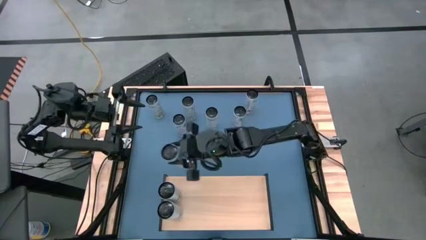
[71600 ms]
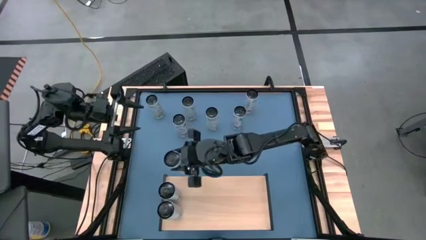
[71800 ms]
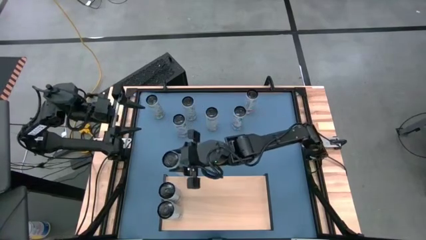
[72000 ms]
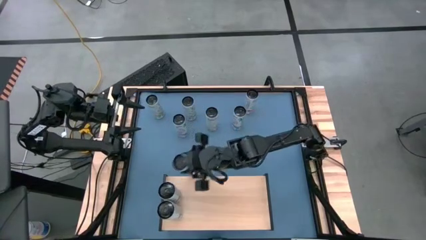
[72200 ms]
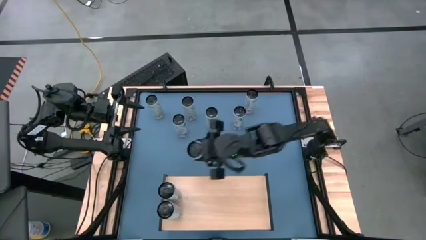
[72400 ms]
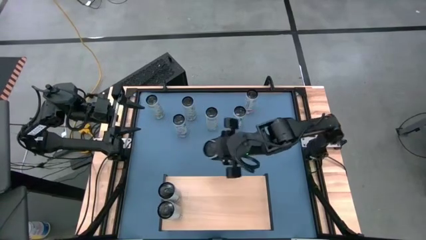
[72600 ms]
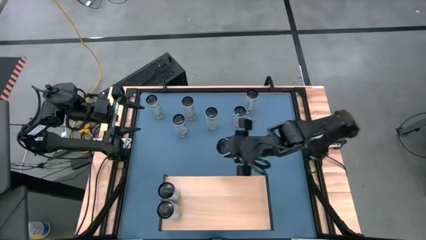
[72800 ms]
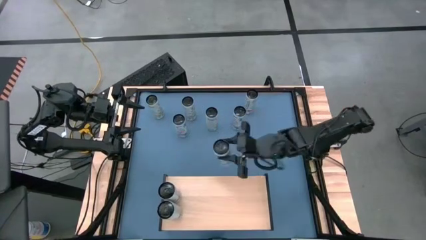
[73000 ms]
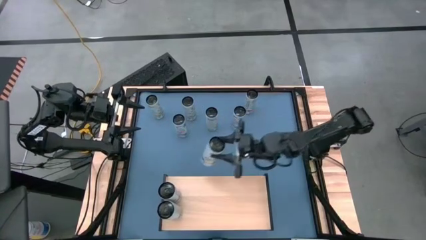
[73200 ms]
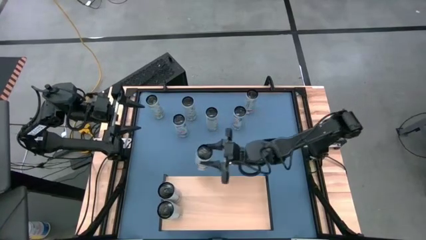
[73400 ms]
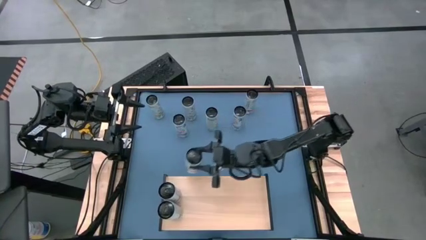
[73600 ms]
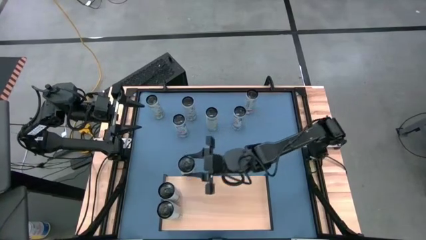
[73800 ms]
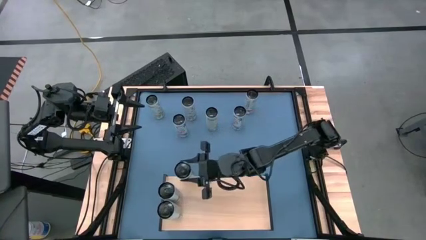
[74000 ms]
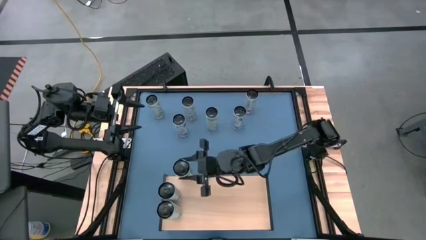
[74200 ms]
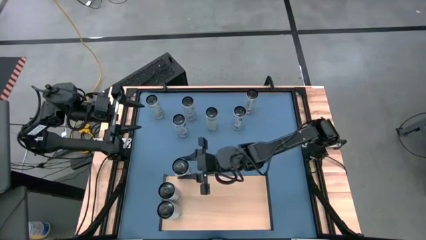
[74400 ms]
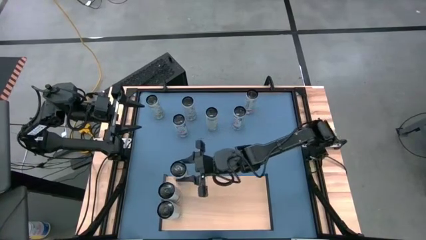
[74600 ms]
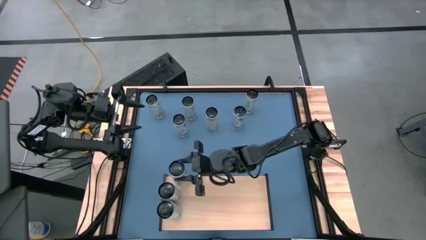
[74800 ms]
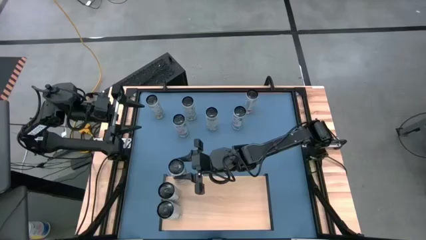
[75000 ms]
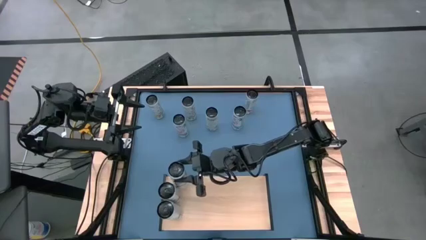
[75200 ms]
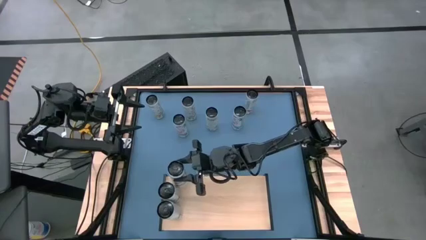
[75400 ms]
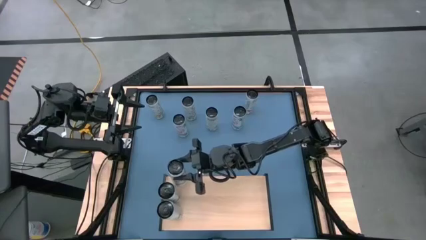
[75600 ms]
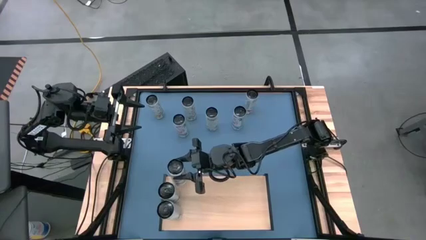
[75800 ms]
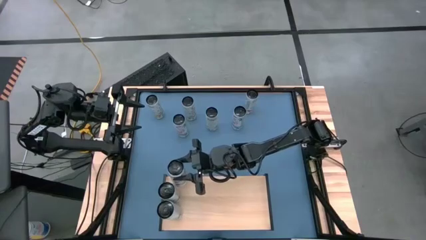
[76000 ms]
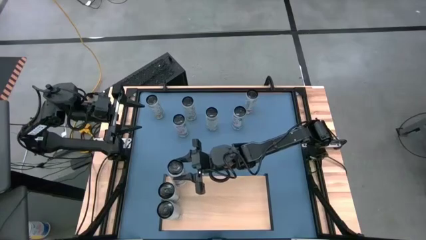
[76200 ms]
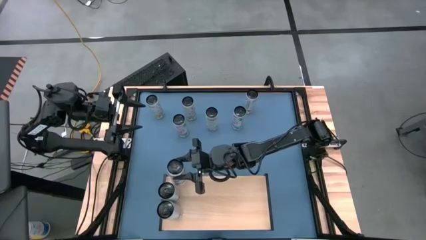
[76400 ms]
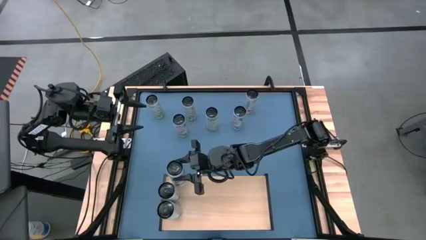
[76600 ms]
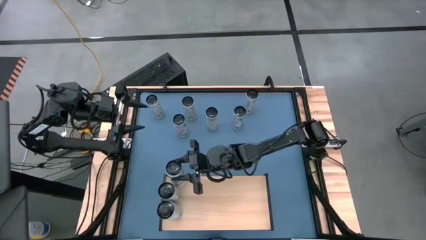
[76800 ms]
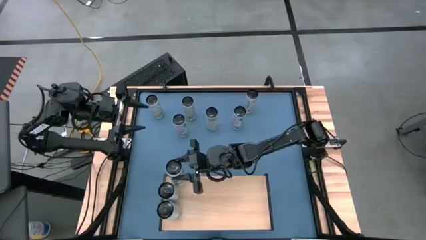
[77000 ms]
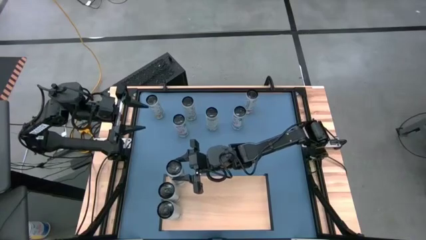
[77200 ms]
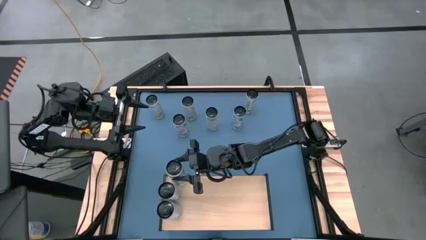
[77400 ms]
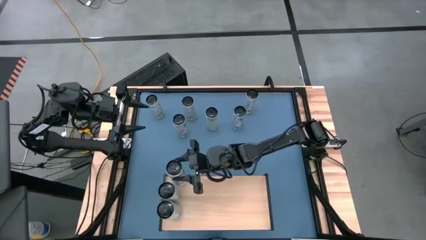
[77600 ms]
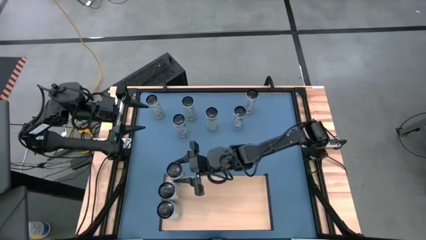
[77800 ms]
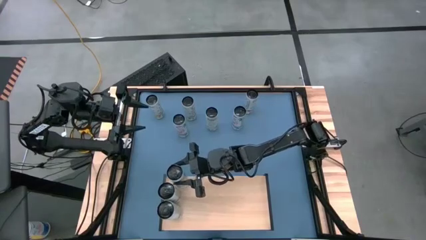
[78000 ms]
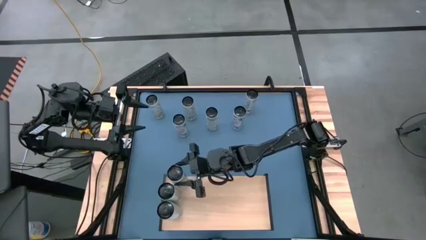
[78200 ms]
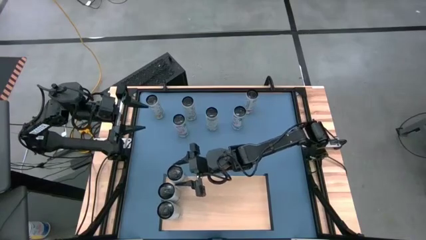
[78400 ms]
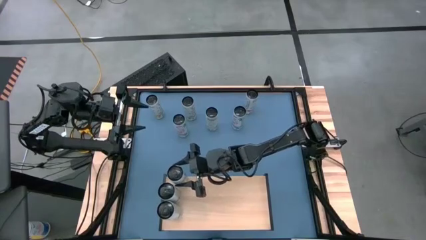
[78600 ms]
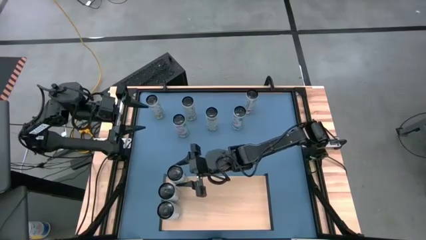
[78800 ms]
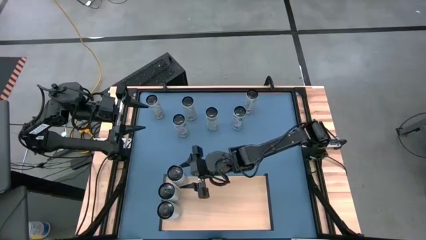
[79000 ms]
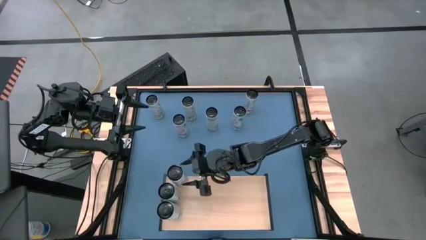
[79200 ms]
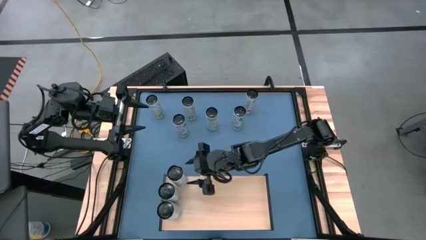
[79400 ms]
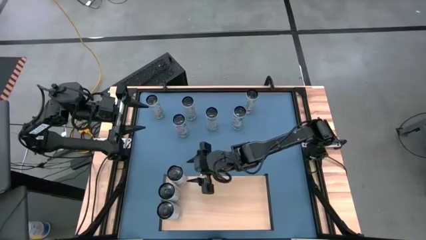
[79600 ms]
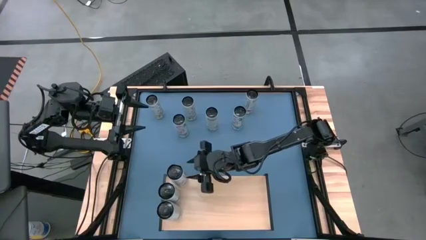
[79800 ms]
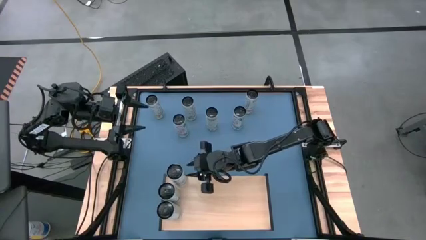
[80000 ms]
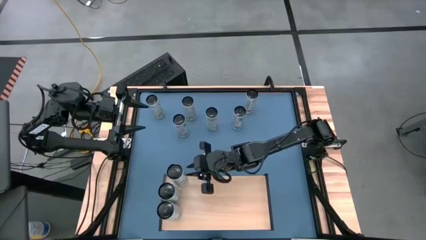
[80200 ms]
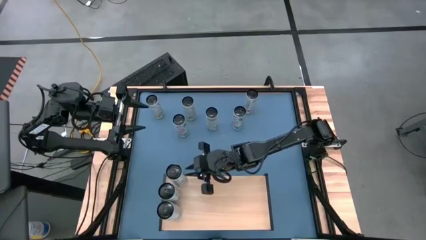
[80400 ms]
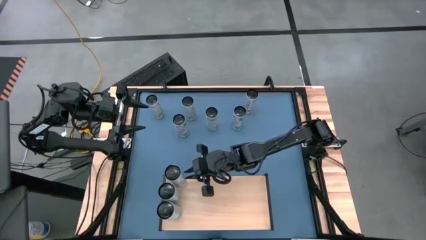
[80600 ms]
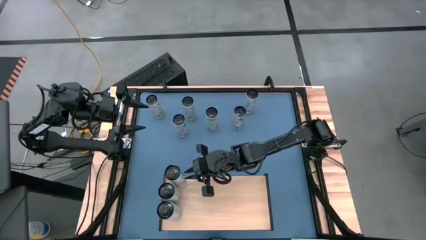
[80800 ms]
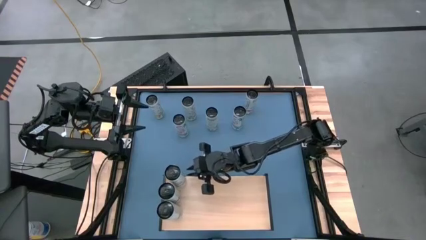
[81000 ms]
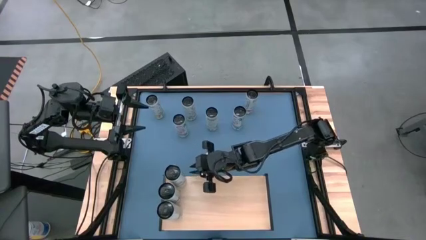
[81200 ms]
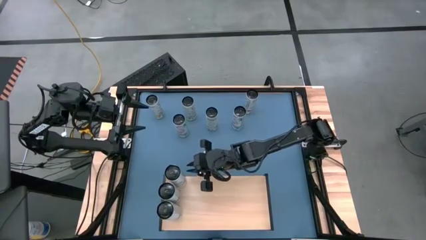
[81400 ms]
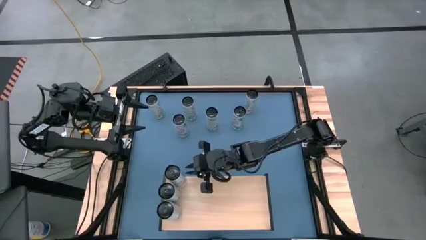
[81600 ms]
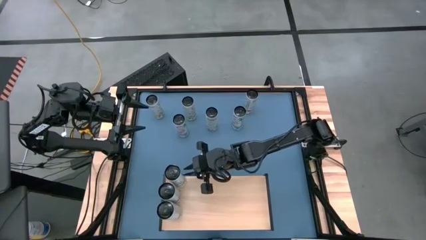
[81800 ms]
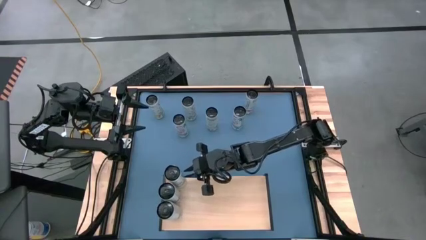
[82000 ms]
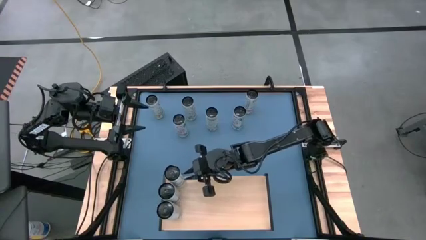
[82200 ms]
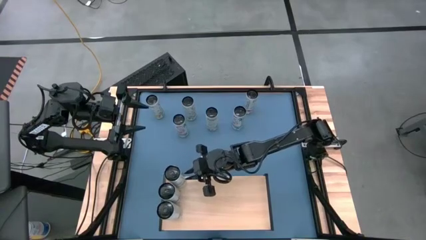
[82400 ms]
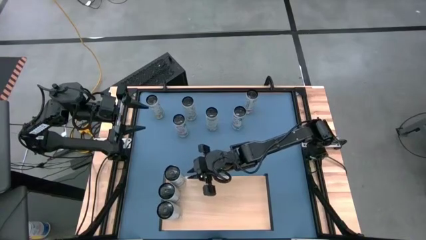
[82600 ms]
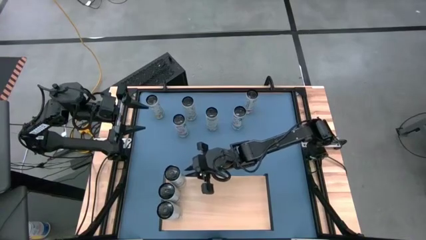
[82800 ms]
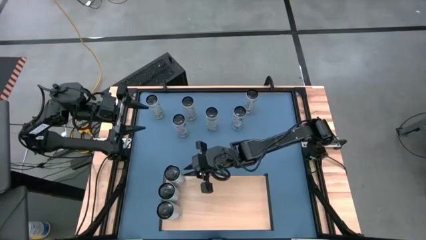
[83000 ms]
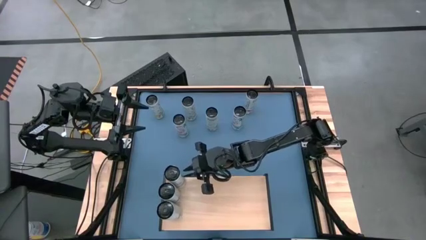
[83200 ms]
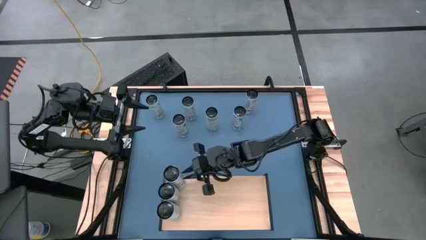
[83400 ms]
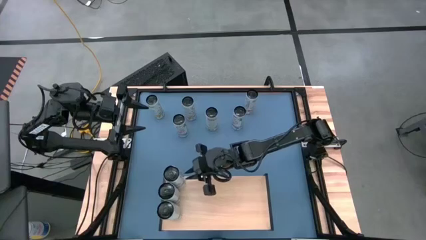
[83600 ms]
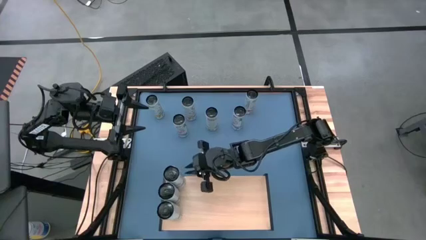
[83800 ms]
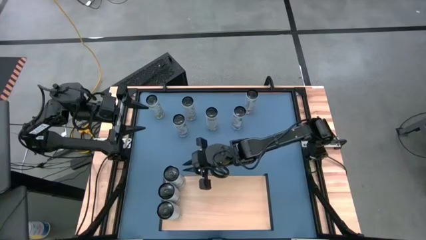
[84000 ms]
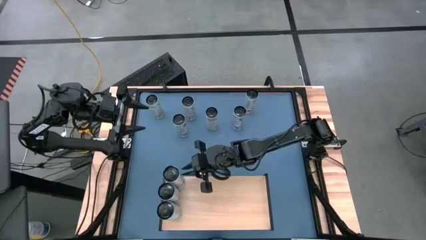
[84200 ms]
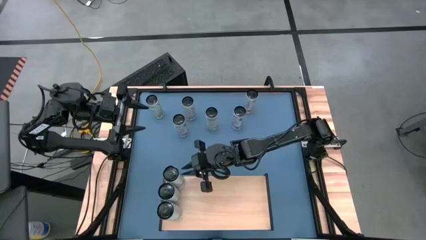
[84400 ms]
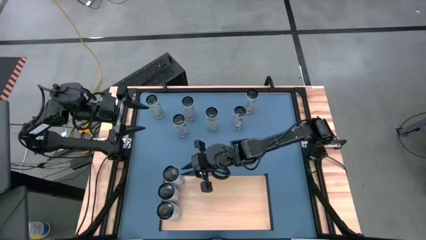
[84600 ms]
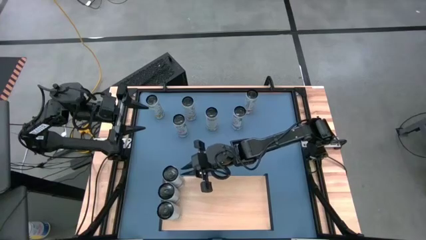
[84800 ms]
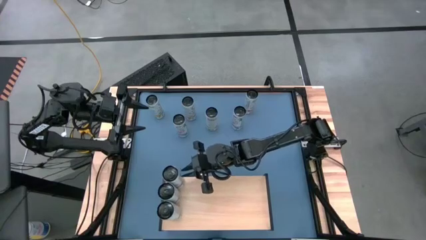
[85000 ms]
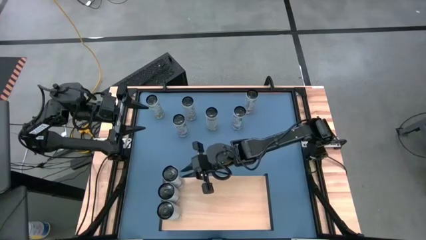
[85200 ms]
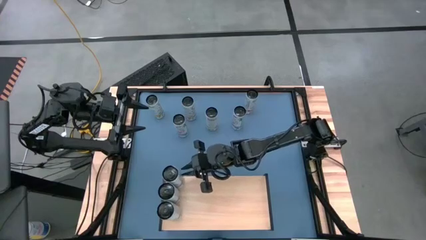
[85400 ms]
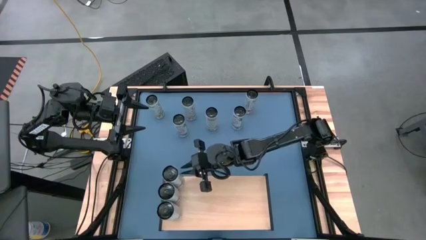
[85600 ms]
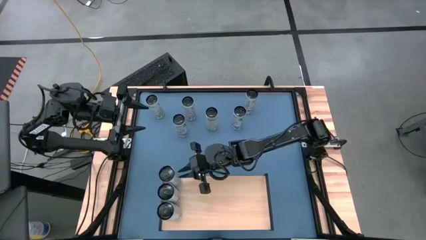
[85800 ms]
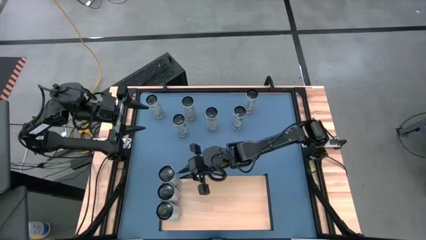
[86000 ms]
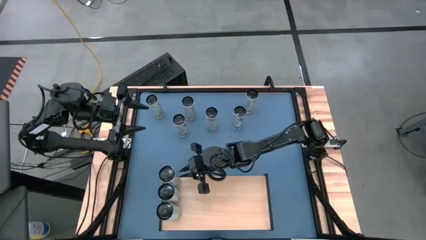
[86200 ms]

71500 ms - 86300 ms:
Task: Place canned beverage on shelf
Put the white blue soda can on the shelf aligned with the other white blue soda cans

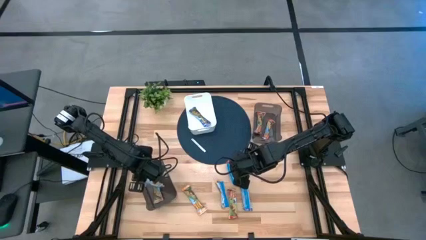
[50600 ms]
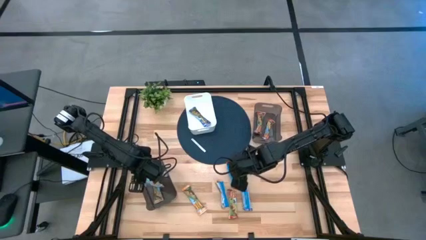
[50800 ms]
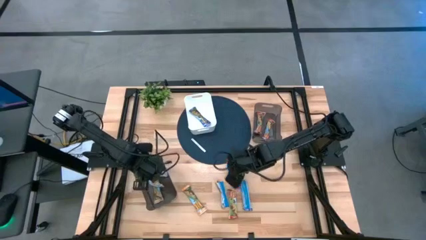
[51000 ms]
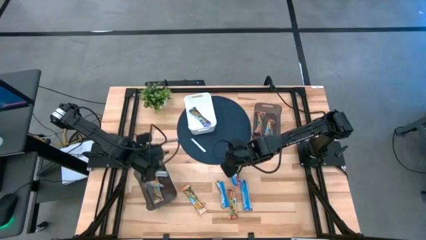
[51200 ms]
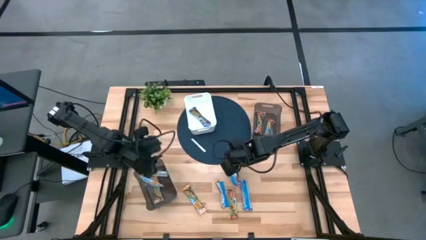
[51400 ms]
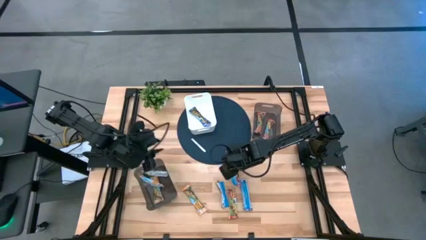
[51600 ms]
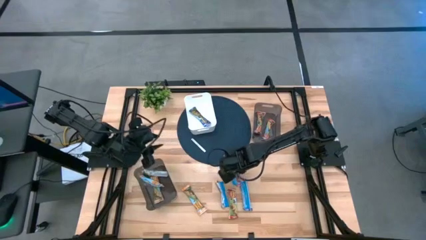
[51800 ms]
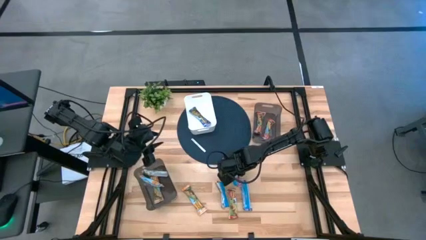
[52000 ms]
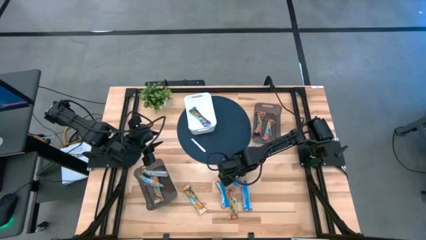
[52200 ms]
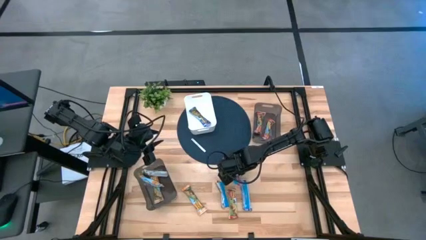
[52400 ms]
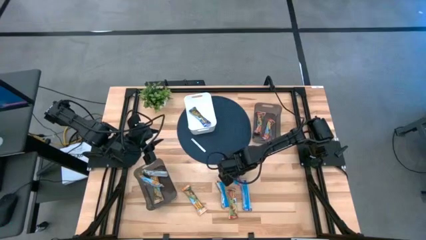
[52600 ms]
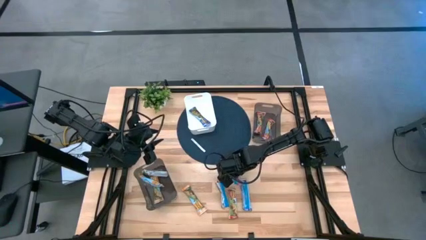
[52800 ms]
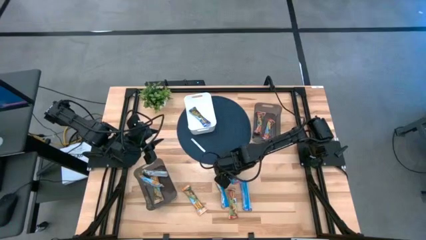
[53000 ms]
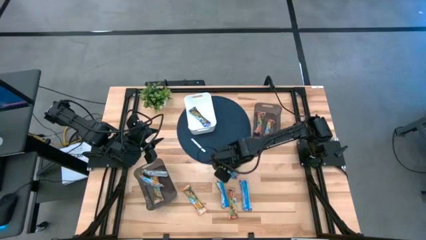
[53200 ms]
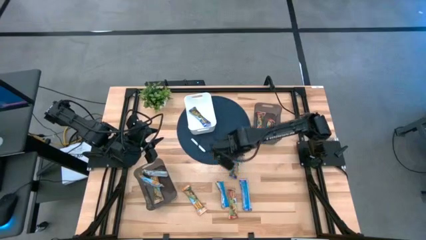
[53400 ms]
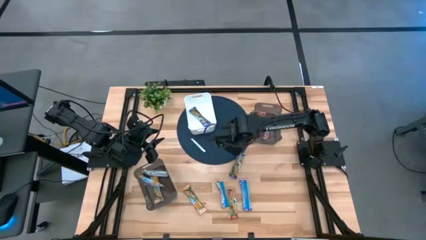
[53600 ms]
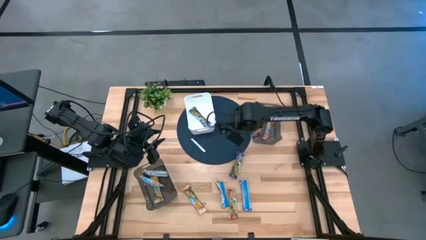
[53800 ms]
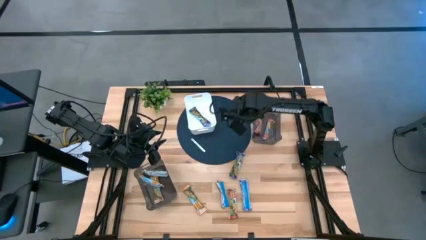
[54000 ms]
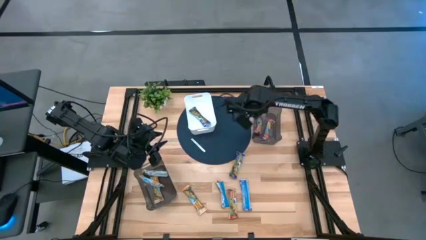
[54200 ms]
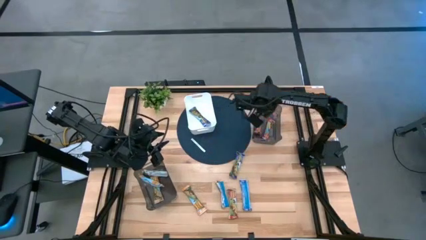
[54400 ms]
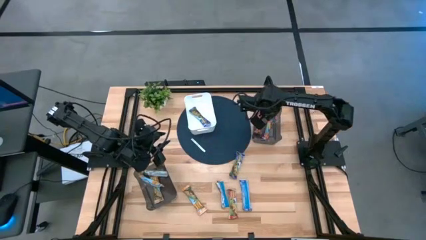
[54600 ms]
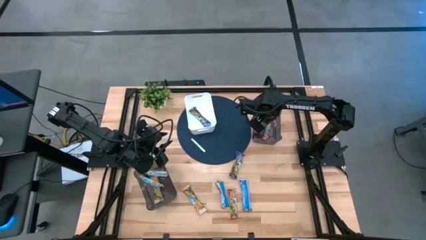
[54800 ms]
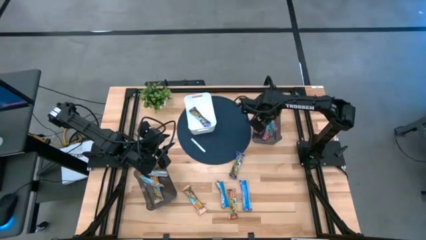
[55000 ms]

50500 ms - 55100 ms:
Task: Pick and place Granola Bars by type
Put the top red granola bar into the top black bin
